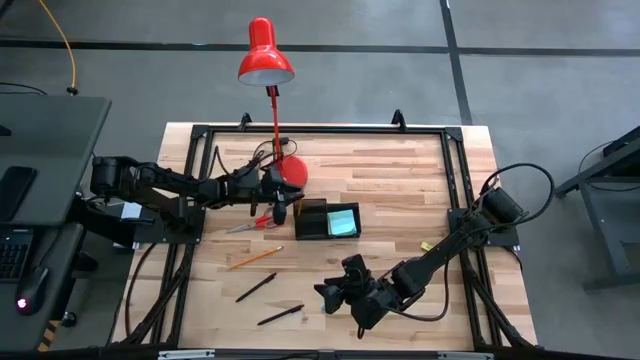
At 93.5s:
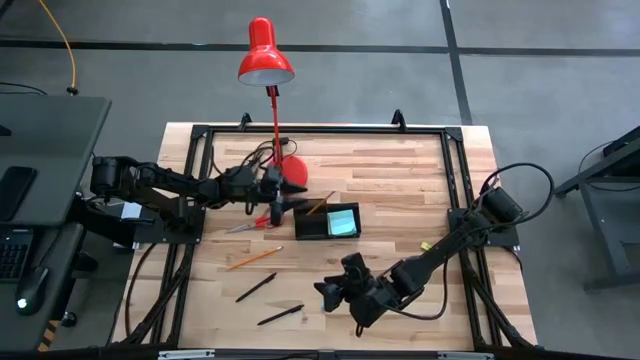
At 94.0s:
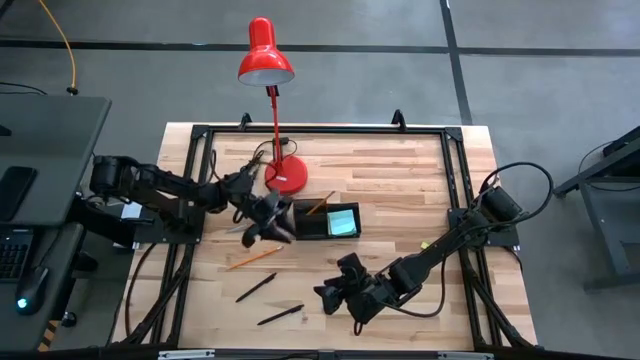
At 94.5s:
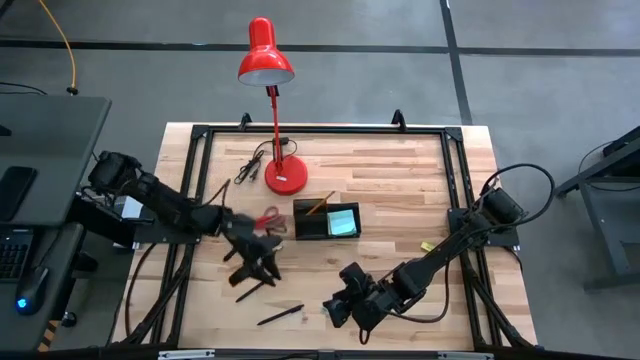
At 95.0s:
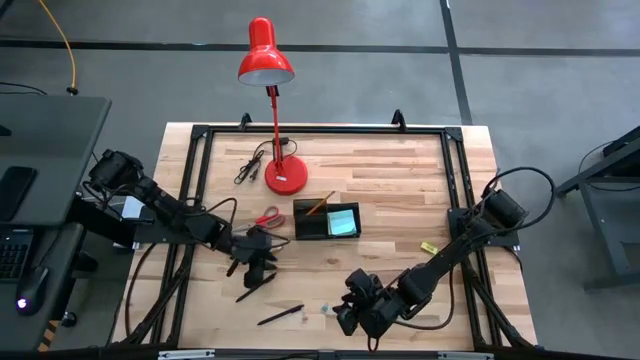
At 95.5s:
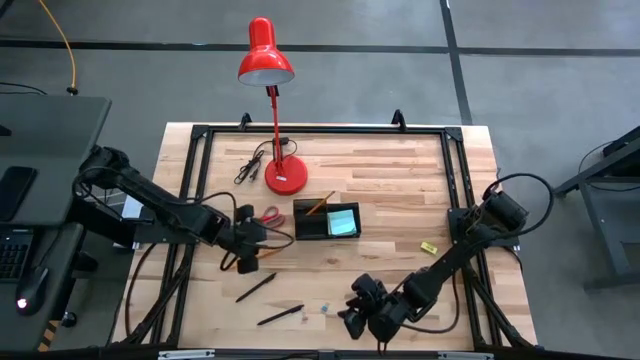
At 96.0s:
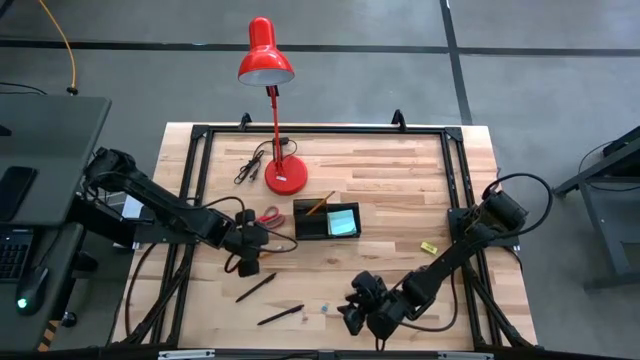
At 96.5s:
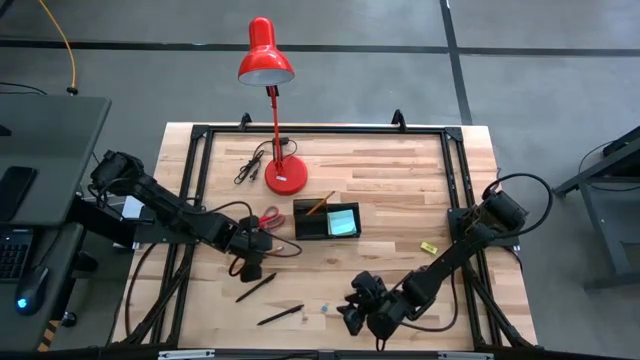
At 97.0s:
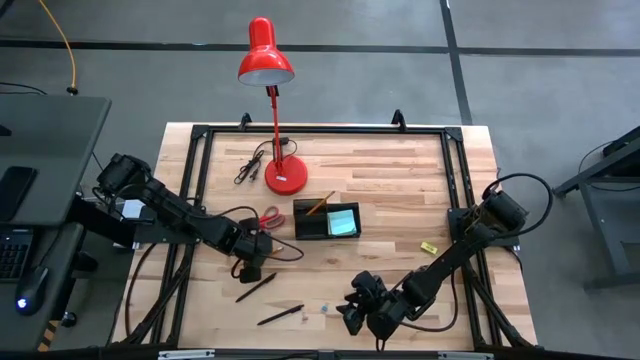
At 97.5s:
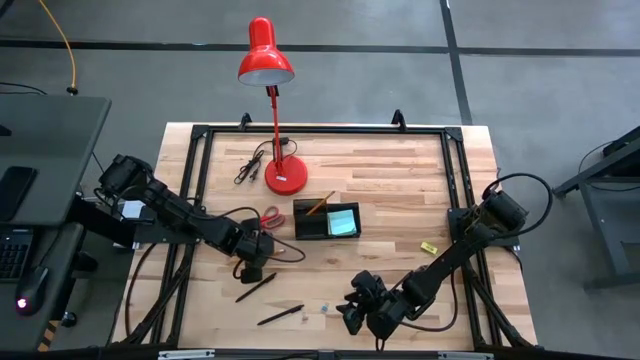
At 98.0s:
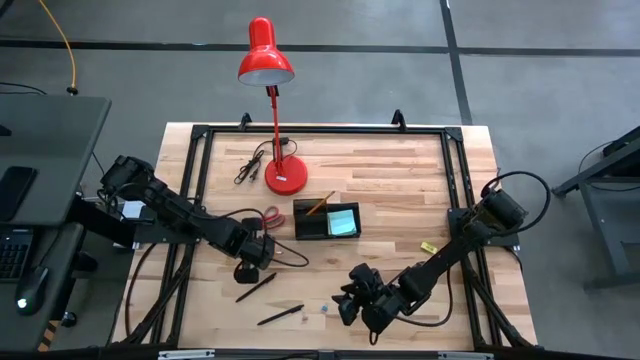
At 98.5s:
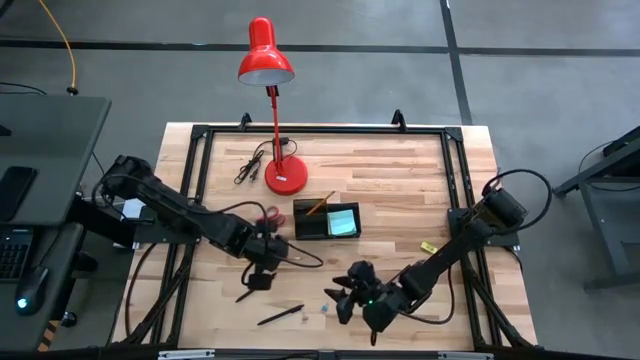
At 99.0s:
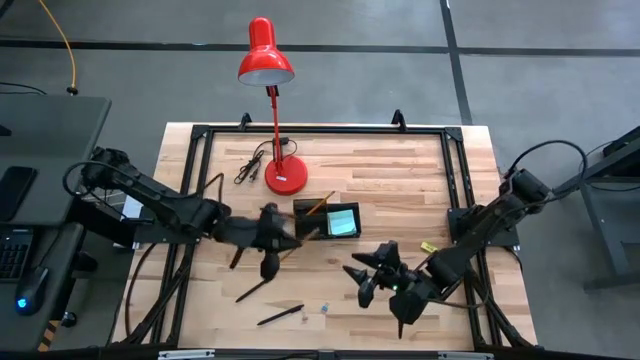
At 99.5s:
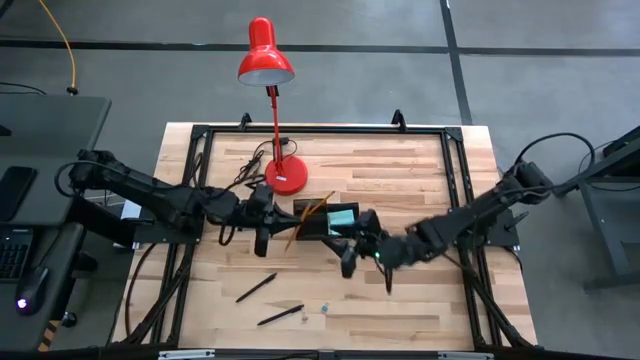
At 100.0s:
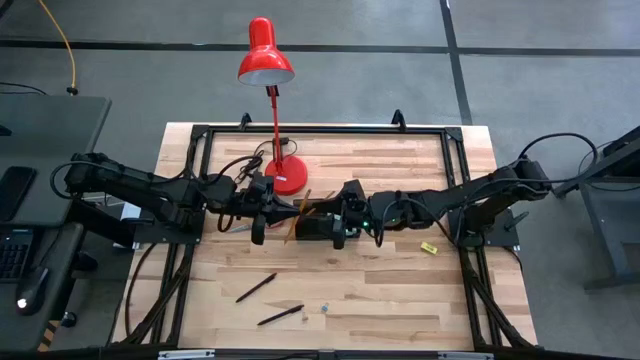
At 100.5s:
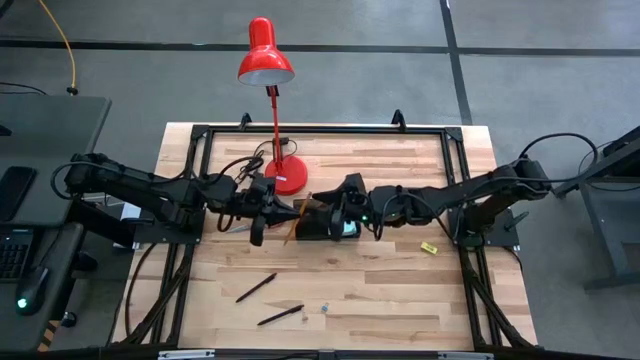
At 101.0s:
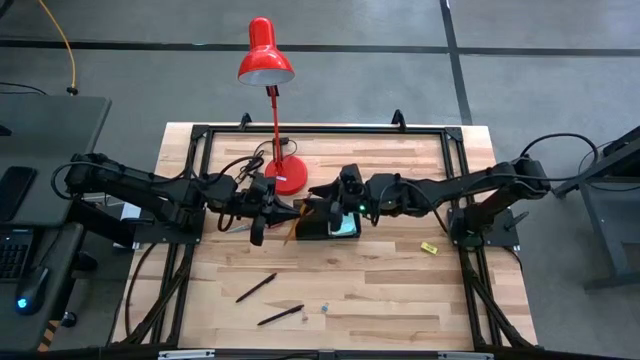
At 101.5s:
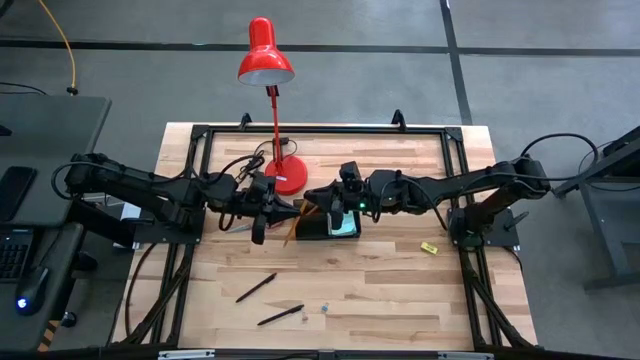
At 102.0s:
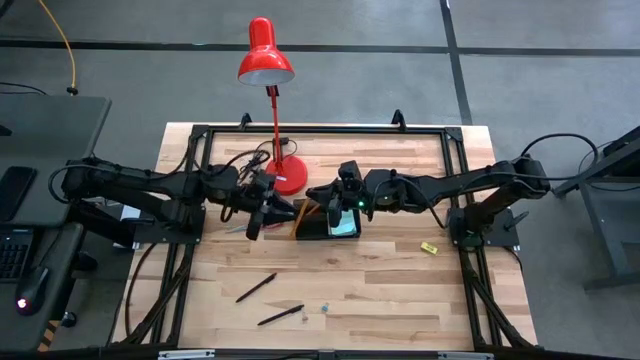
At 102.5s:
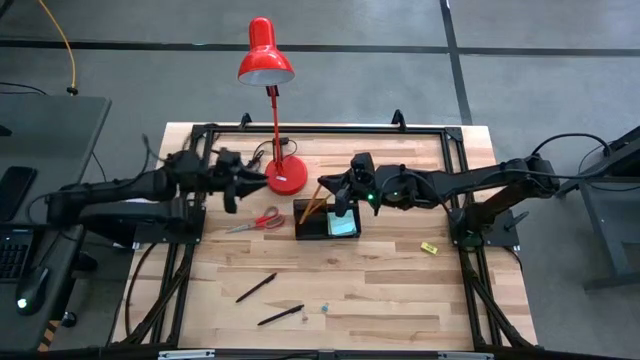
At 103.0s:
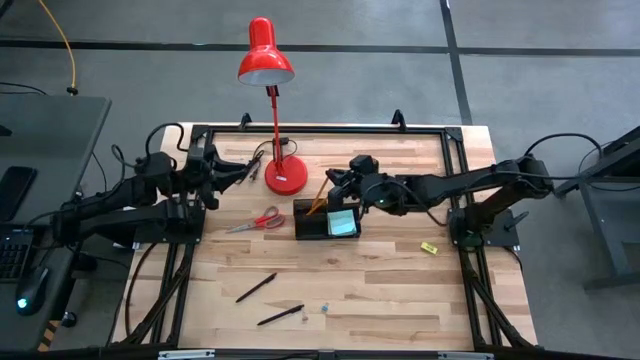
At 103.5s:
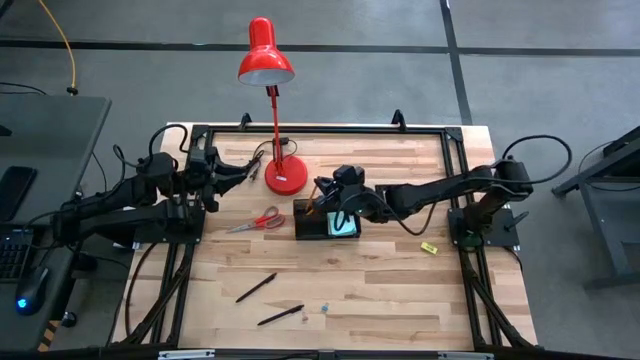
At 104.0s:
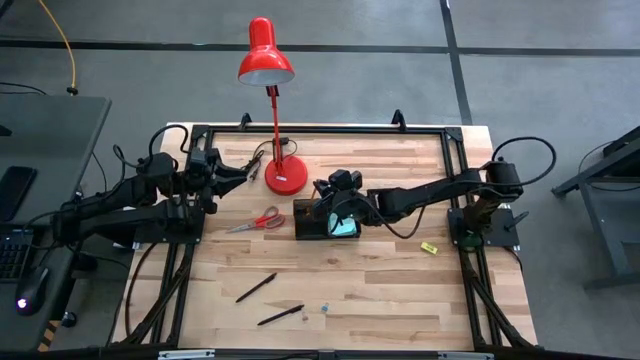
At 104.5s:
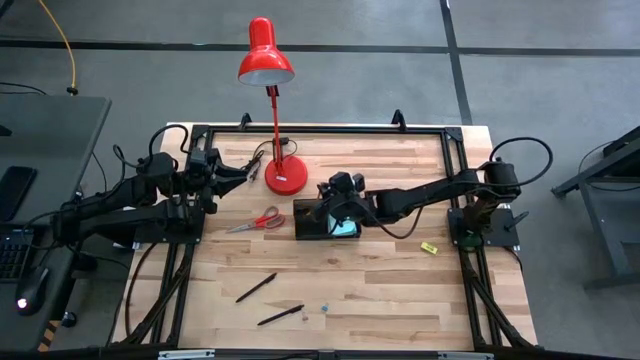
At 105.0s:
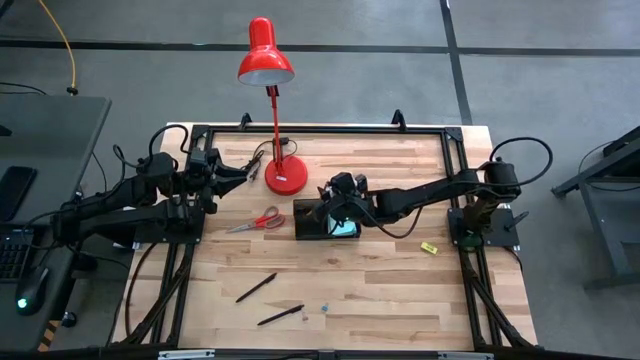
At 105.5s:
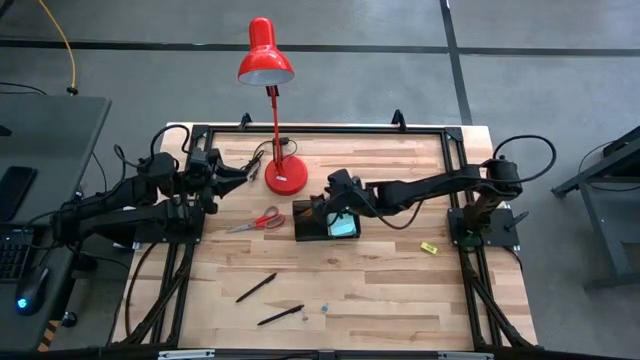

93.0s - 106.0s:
Task: Pick and place office supplies into organizer
Put the orange pencil into the black desk organizer

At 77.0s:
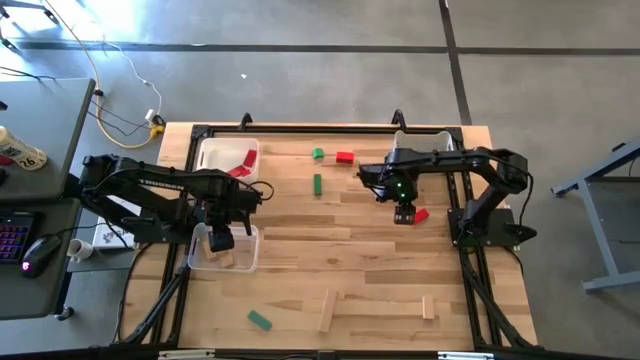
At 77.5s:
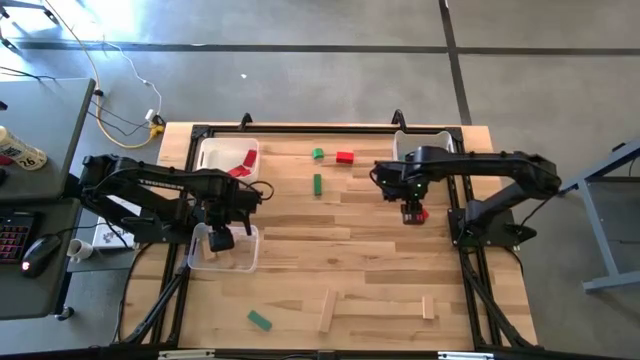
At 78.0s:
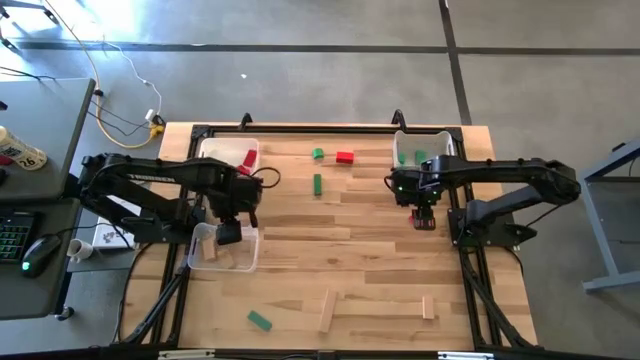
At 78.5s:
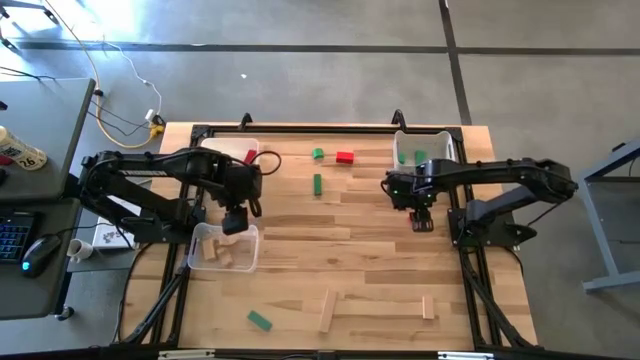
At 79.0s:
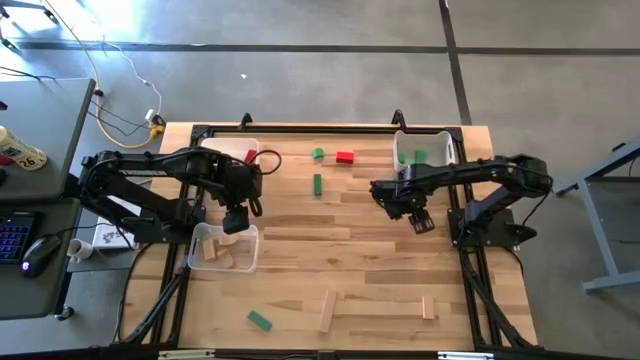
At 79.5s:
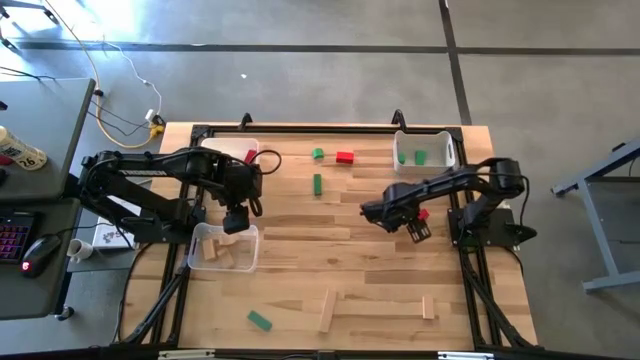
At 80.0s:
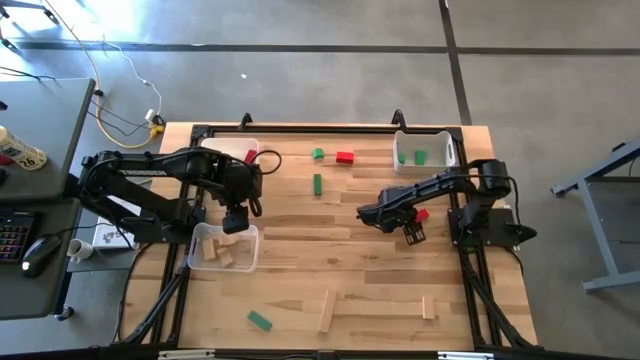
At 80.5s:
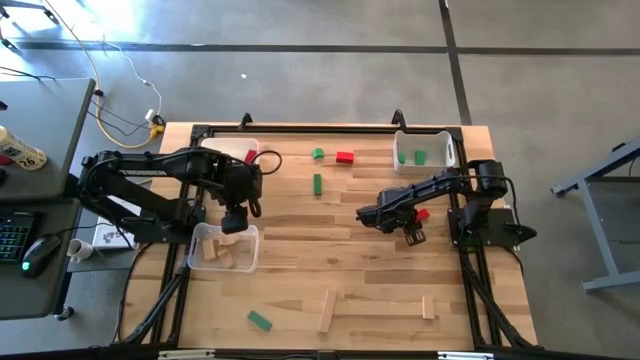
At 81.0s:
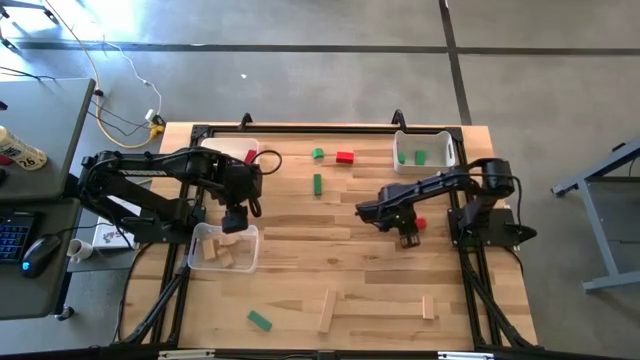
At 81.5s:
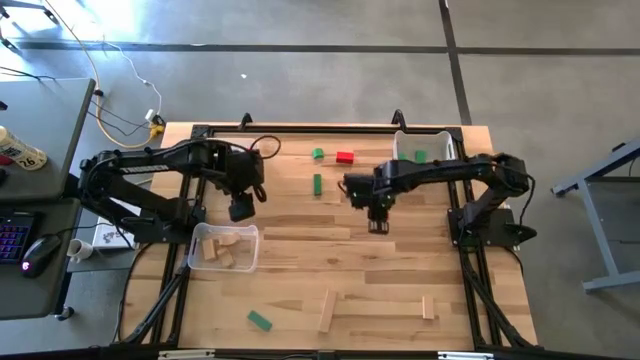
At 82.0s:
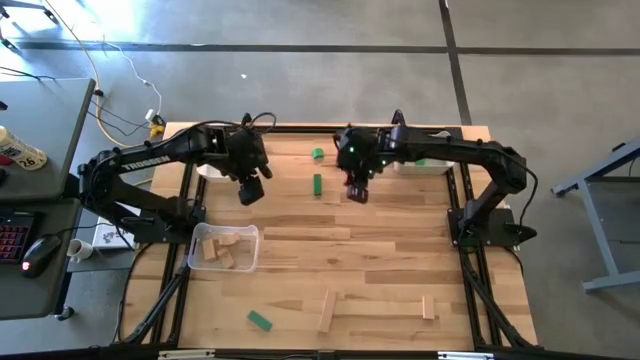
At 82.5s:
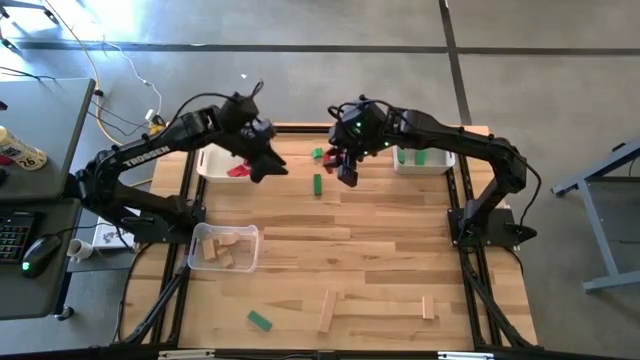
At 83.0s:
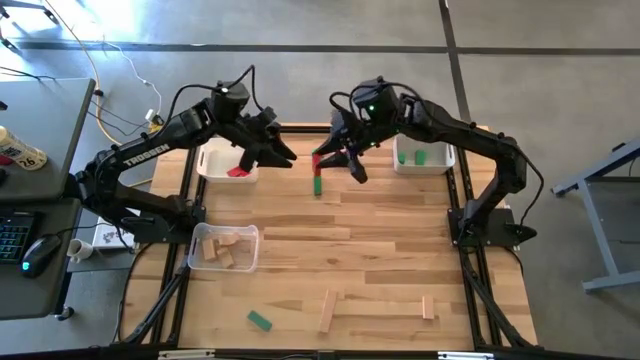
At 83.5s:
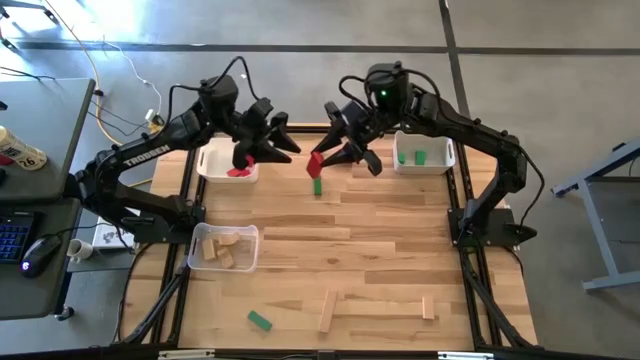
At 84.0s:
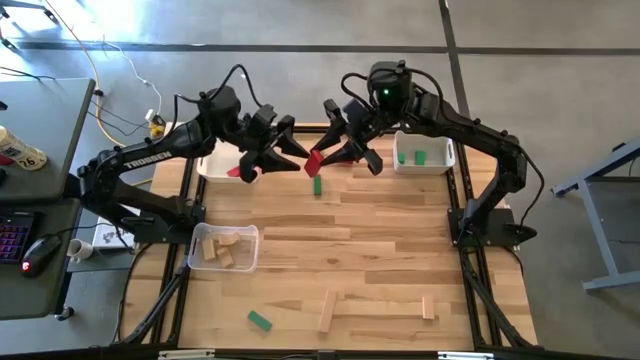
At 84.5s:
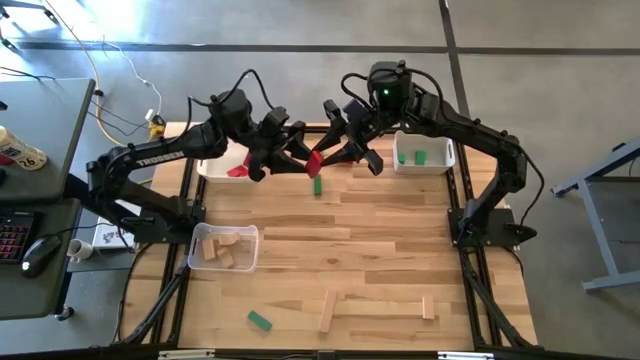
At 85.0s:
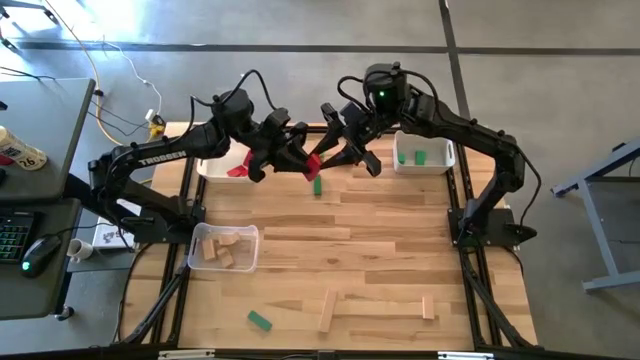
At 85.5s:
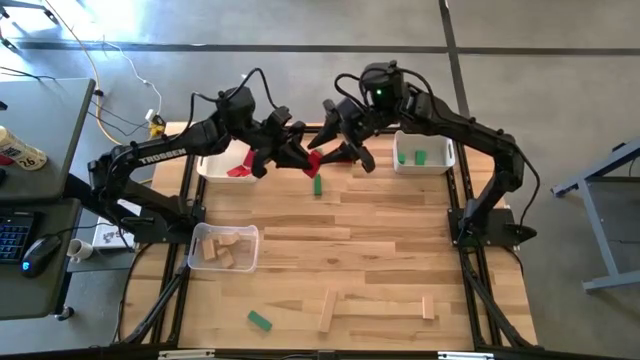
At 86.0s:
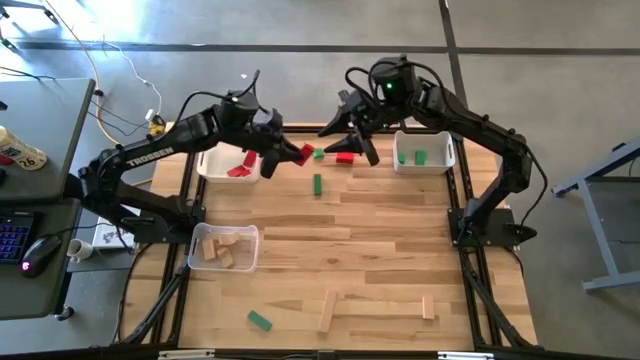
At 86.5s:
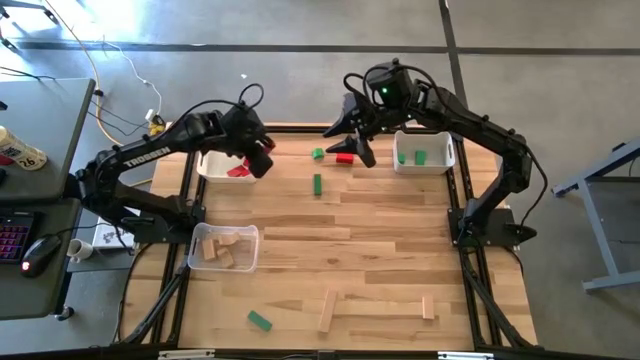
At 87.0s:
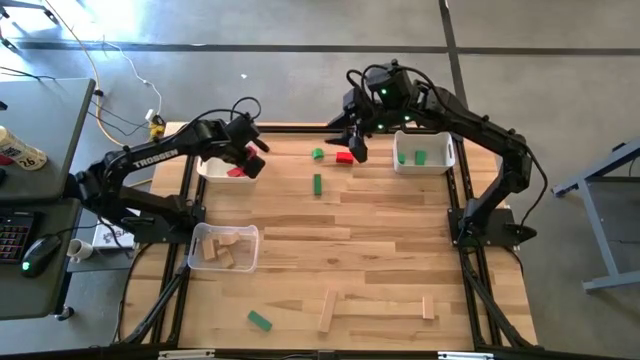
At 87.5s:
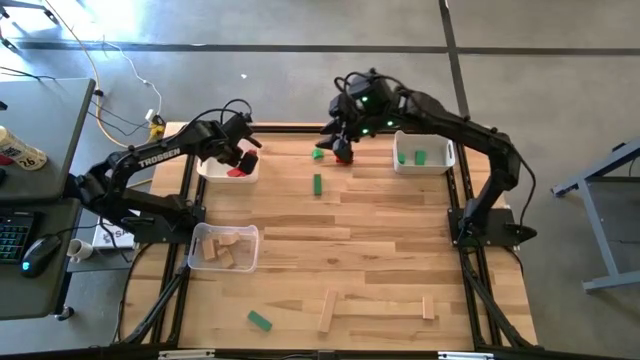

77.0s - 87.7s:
Task: Sort & place blocks by color
Put the red rectangle into the left white bin
